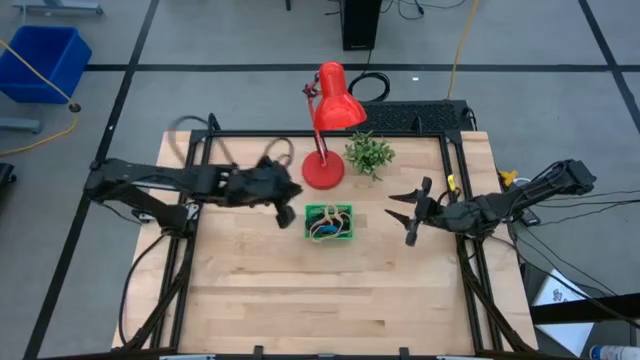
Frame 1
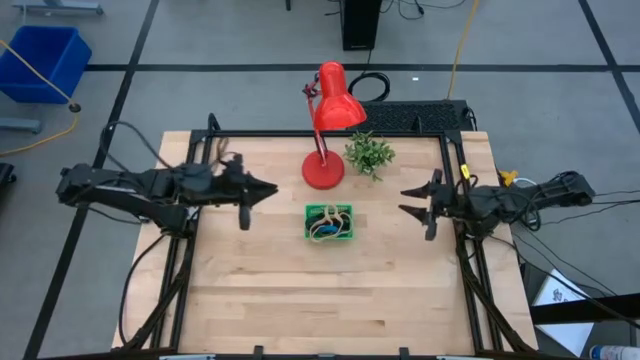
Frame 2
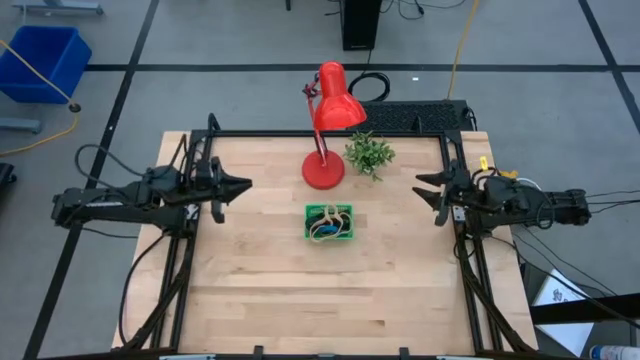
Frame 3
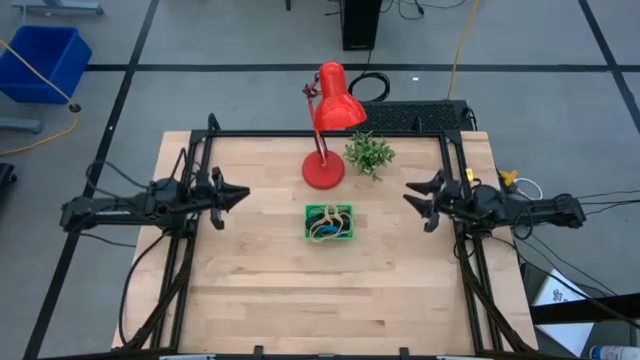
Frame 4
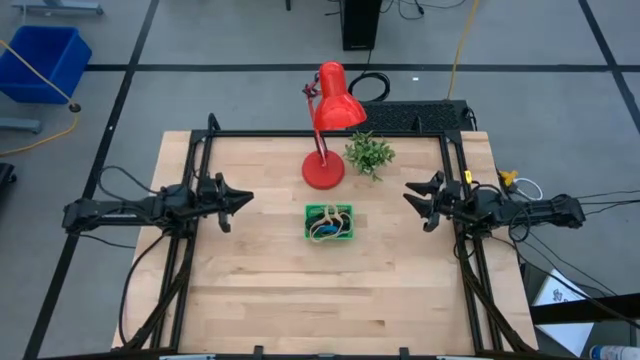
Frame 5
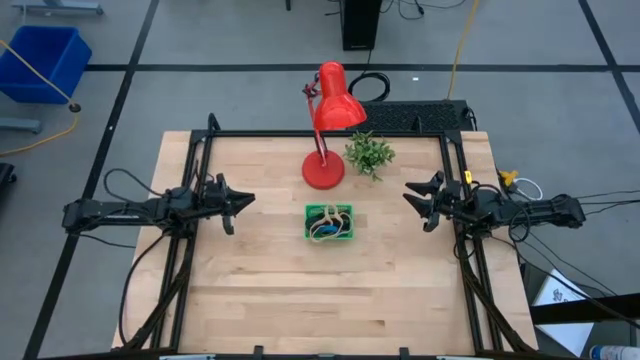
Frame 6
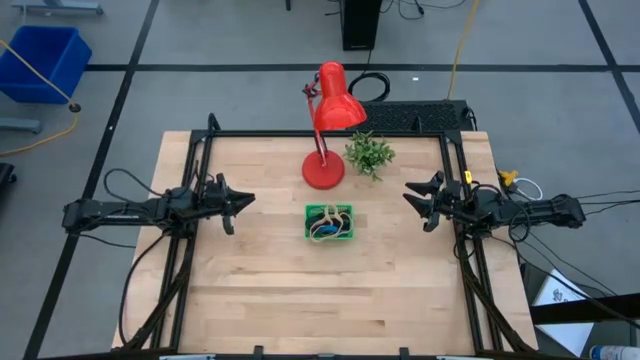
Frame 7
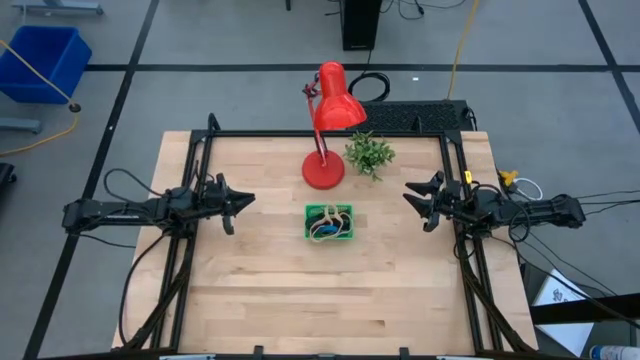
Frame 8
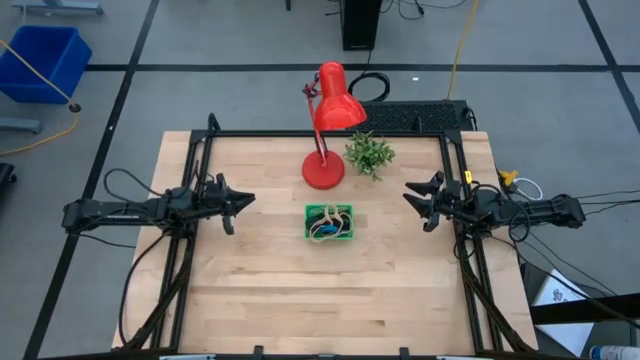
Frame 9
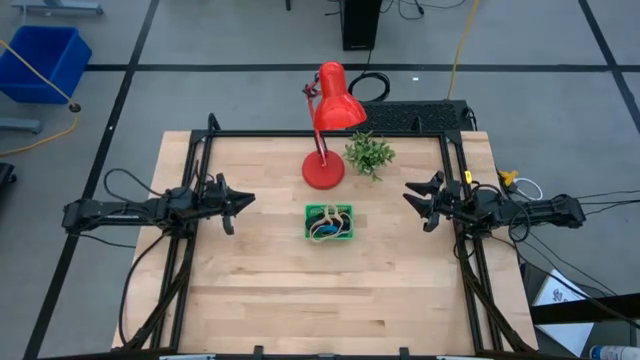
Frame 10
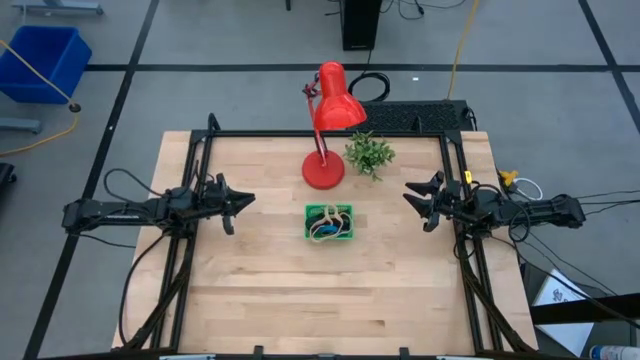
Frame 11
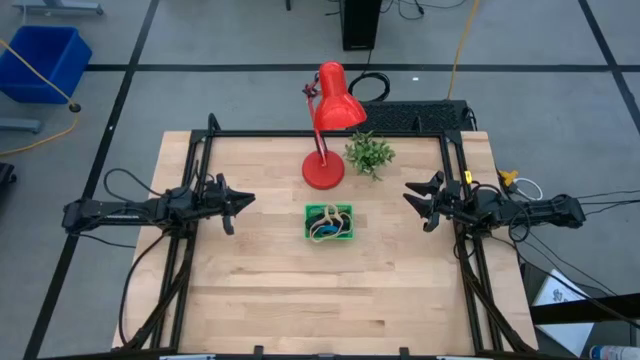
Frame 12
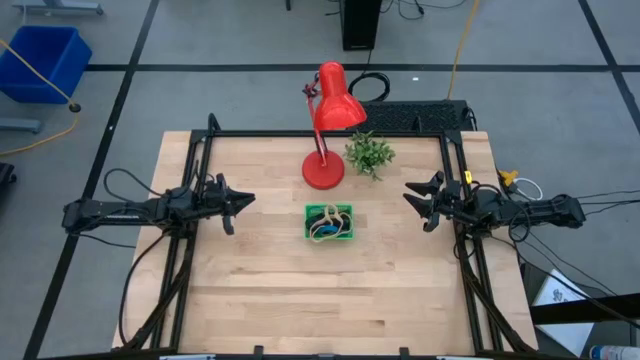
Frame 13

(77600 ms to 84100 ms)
Task: Pick and place rubber bands into bin
Return to Home Position

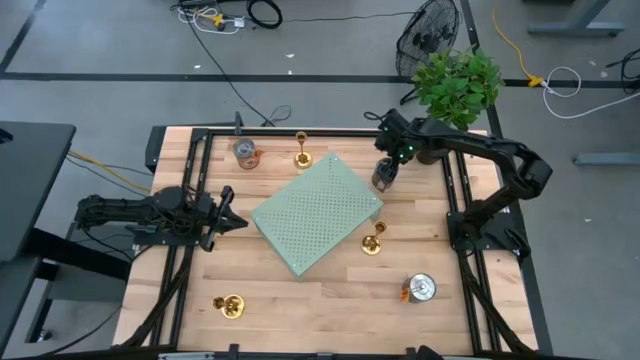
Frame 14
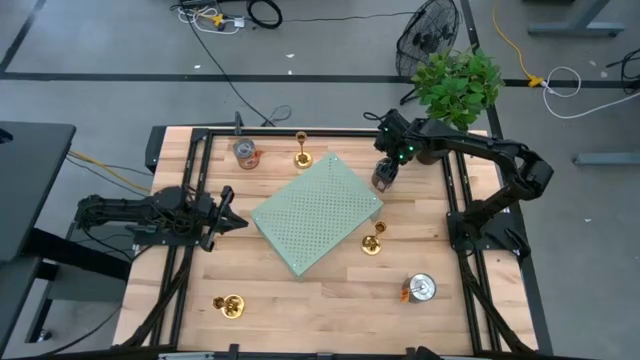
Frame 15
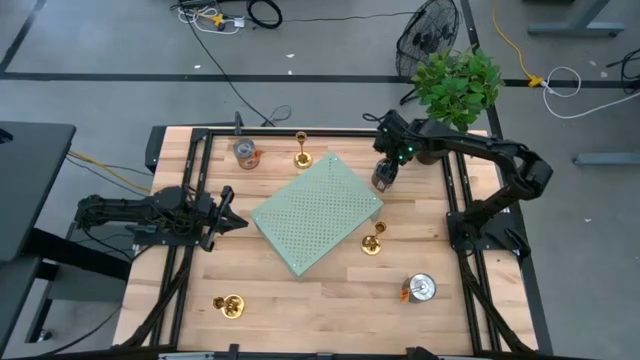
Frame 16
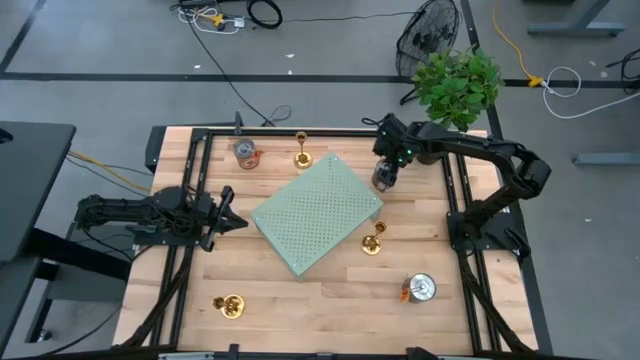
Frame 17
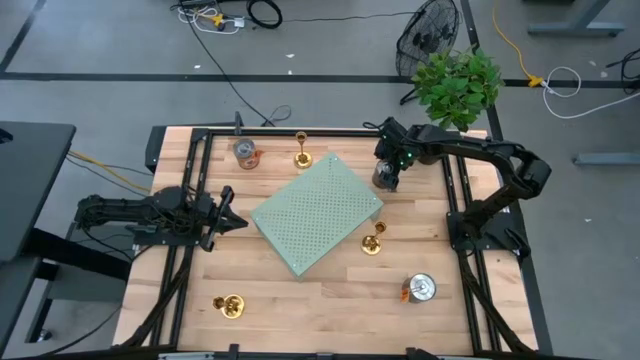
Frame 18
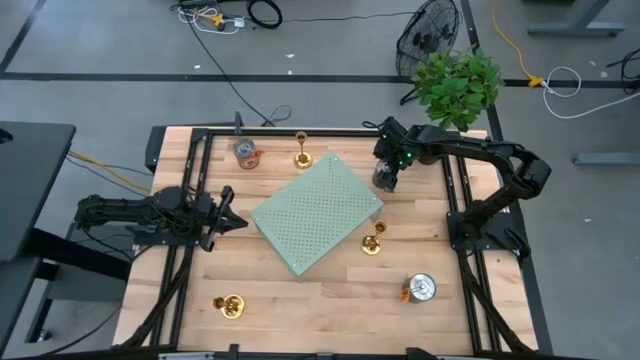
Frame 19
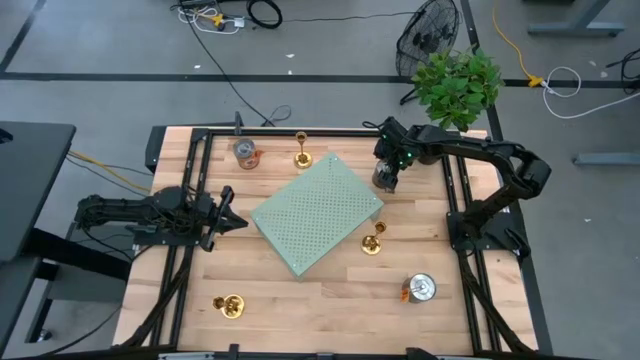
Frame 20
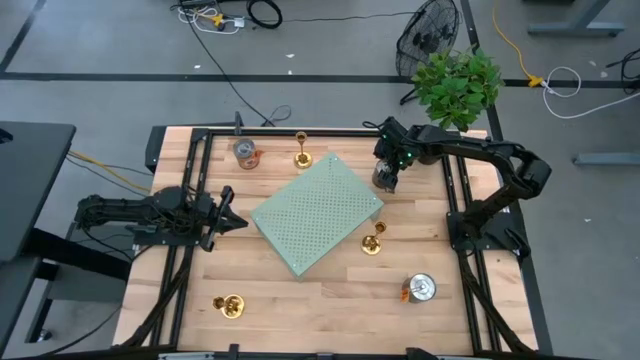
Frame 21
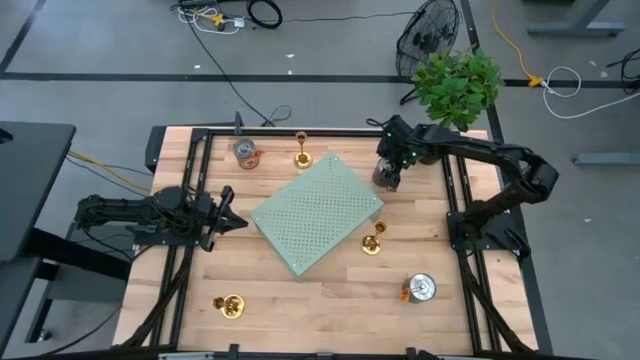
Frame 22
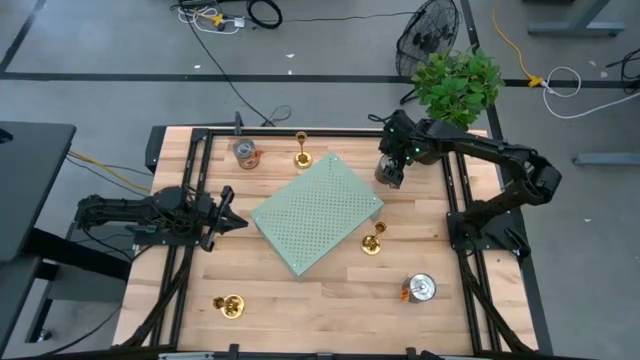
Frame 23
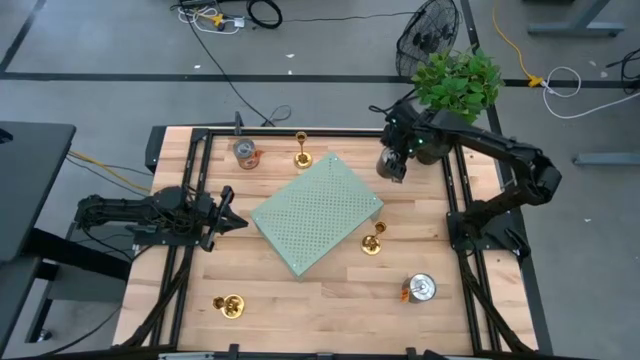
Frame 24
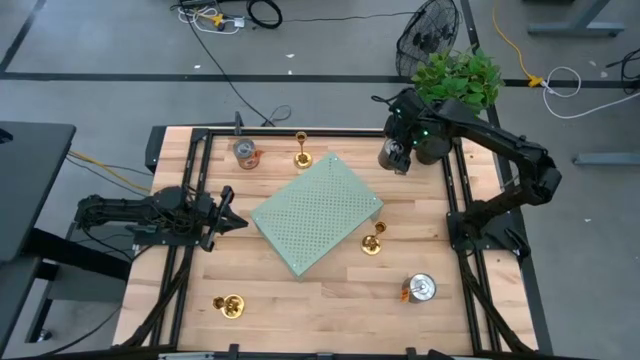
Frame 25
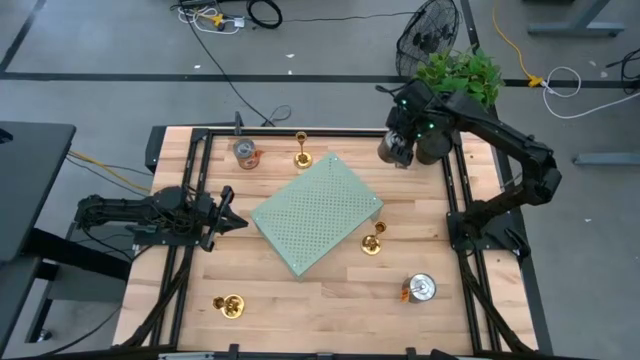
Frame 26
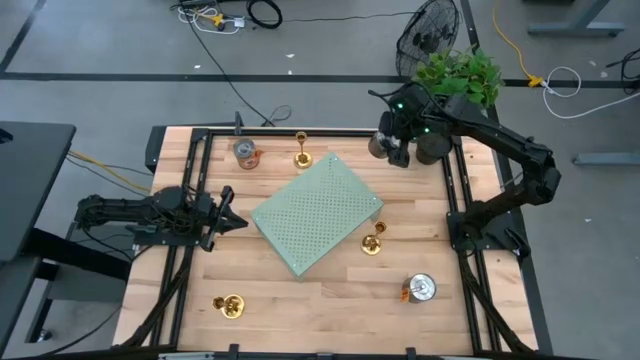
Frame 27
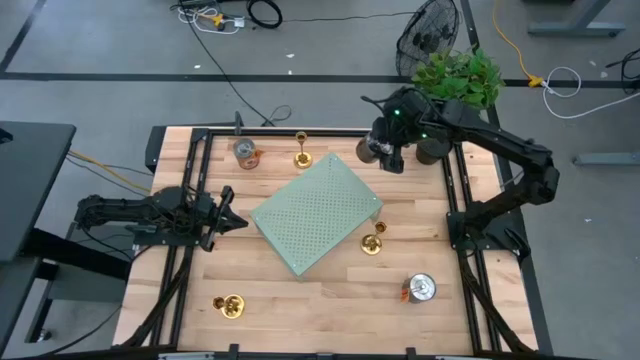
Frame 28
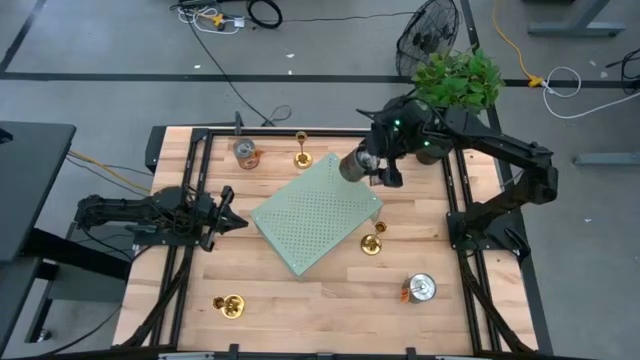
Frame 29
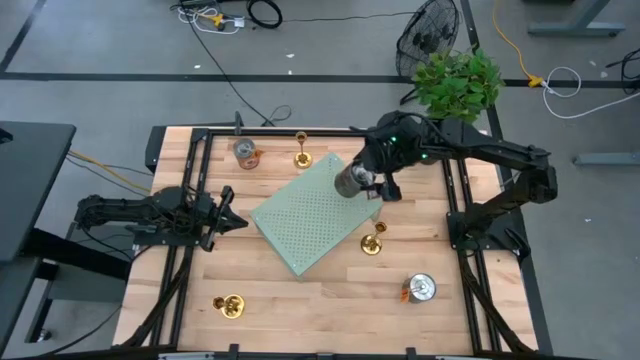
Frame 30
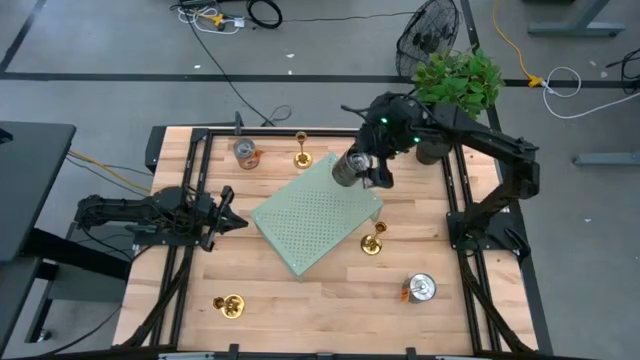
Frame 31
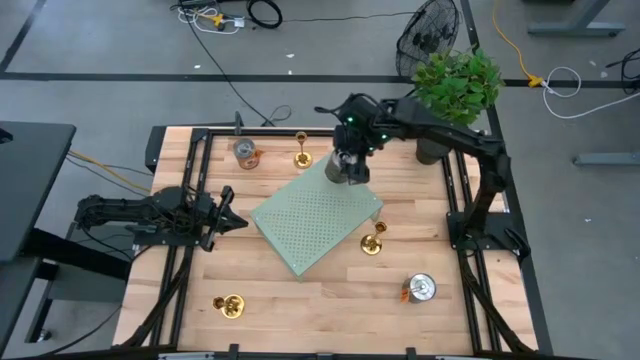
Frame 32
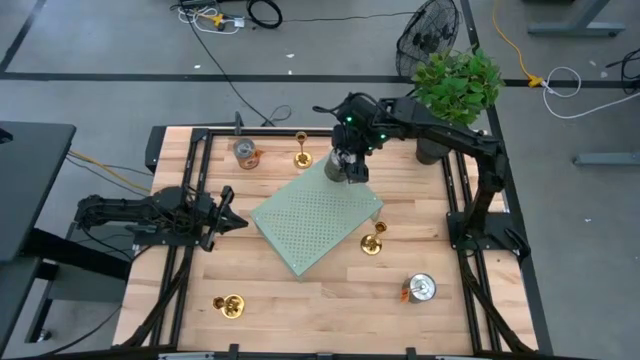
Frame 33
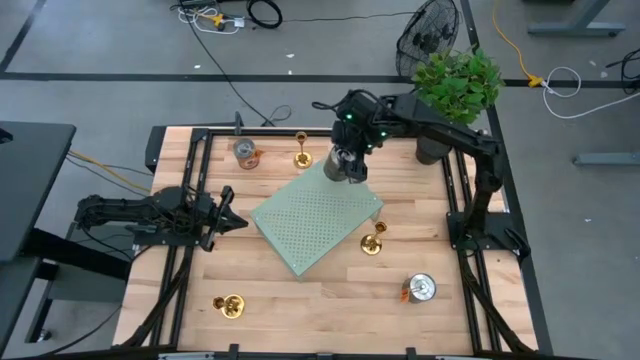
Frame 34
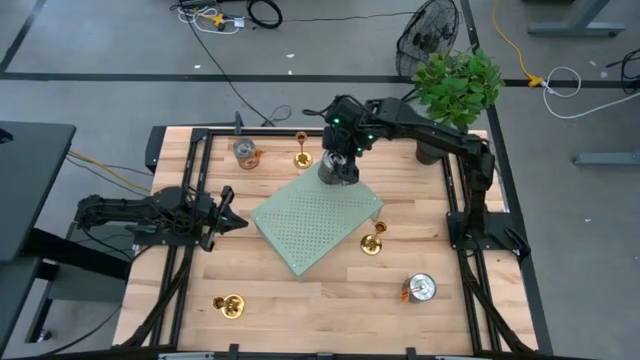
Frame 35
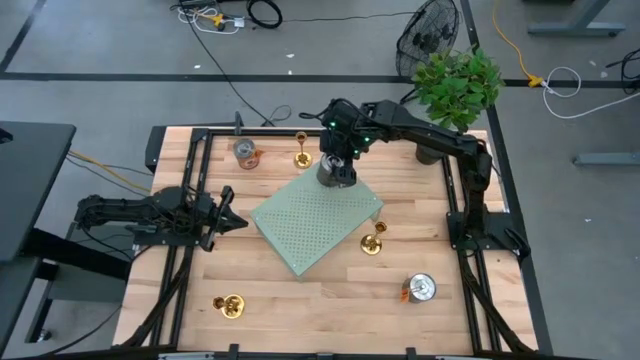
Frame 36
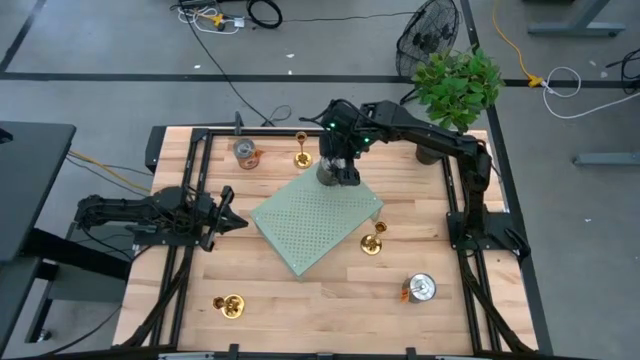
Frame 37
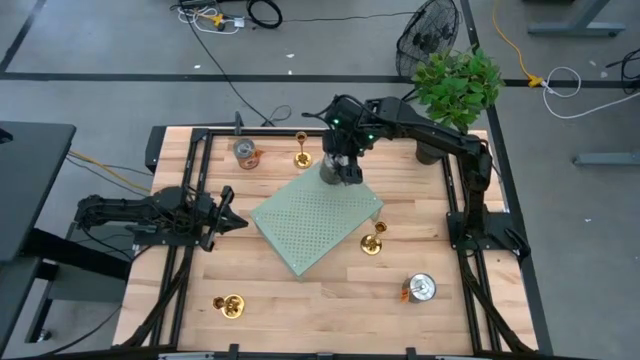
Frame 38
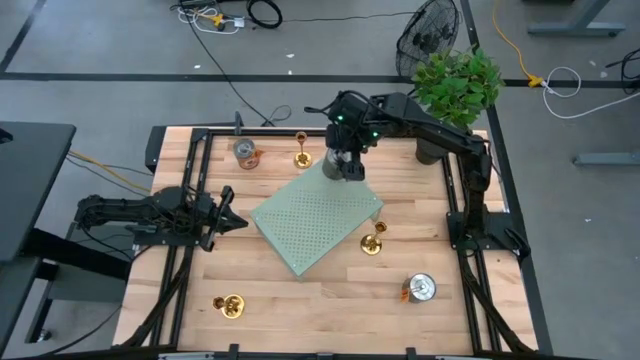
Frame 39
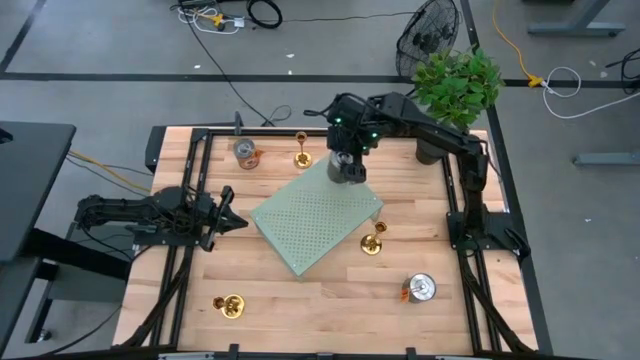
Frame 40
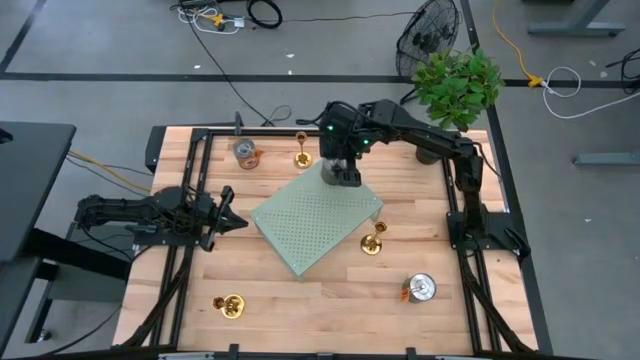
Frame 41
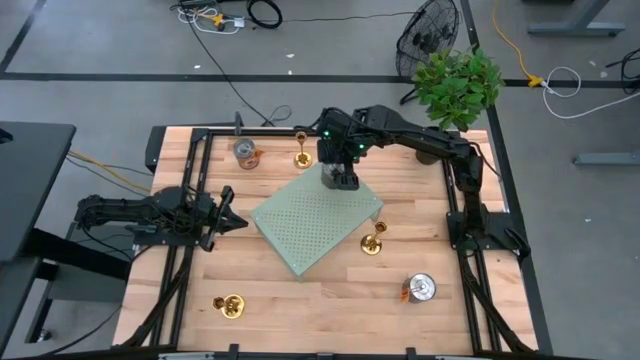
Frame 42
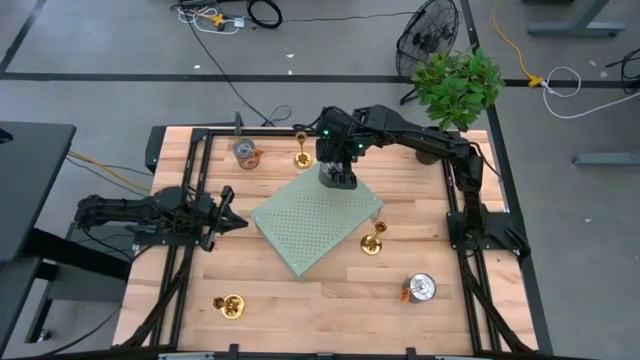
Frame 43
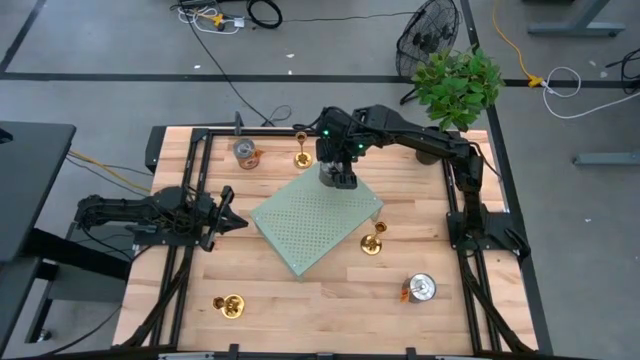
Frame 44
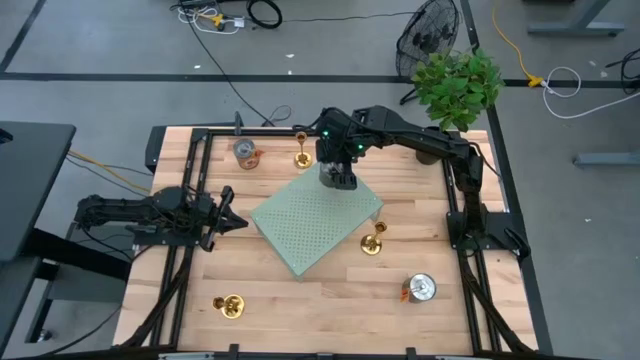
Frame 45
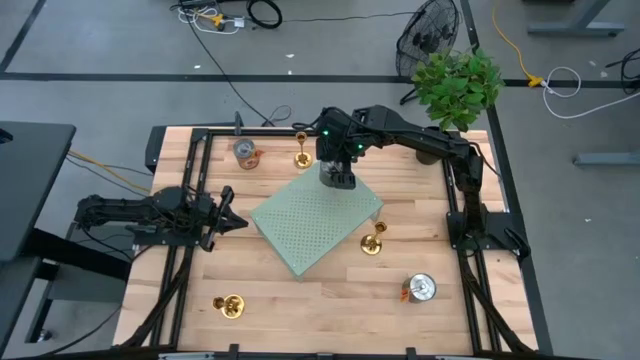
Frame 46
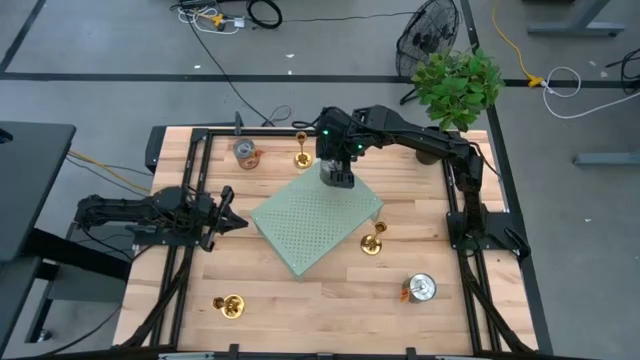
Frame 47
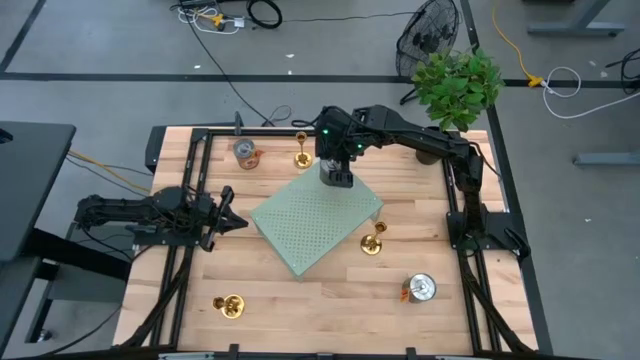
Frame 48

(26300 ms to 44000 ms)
Task: Pick & Place candle stick holders
Put the top right silver scented candle on the shelf
